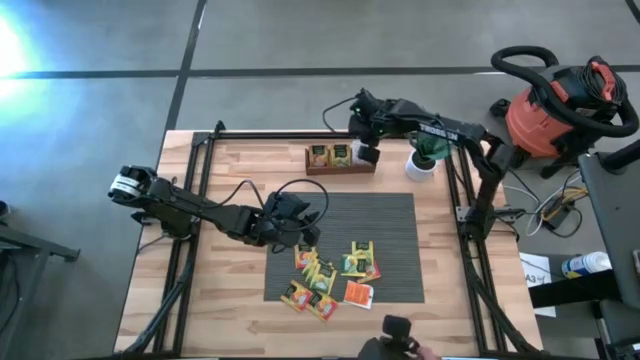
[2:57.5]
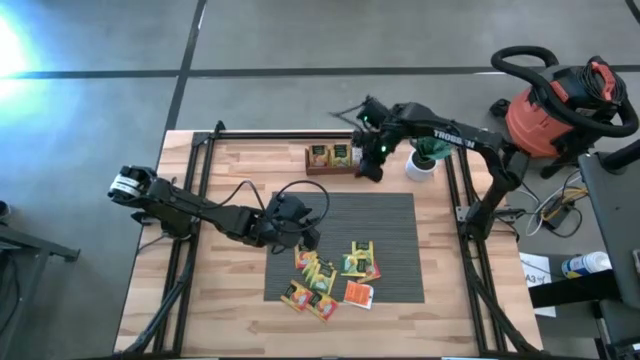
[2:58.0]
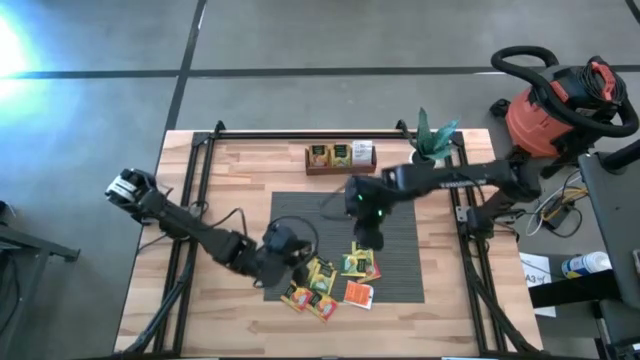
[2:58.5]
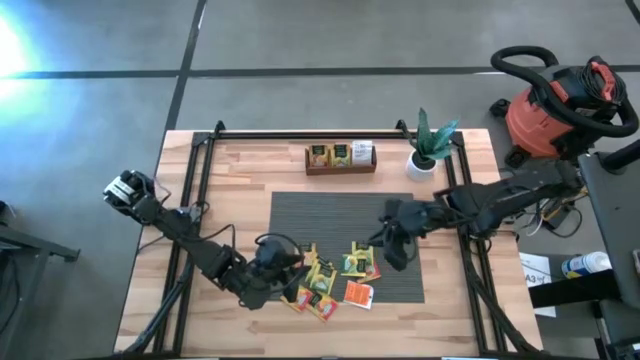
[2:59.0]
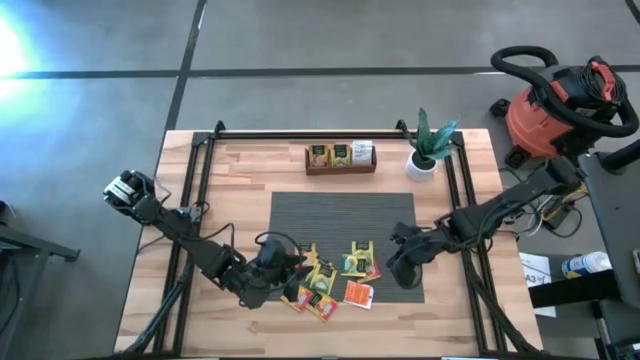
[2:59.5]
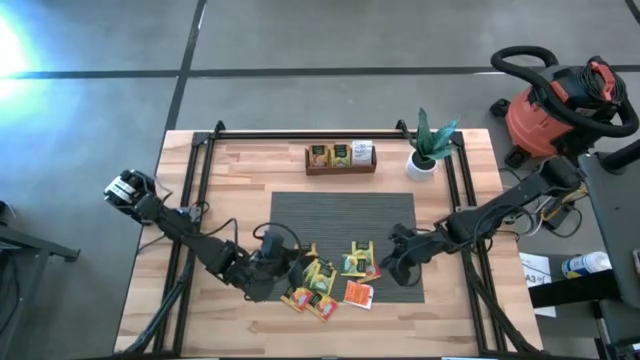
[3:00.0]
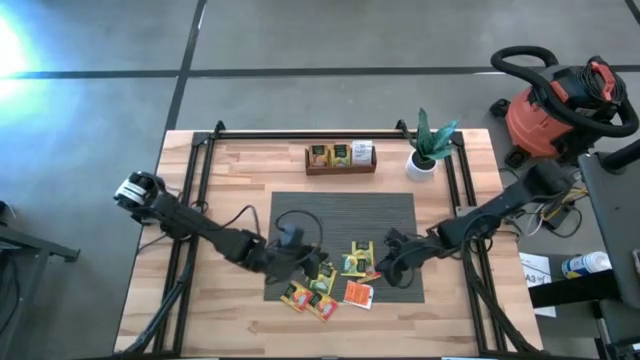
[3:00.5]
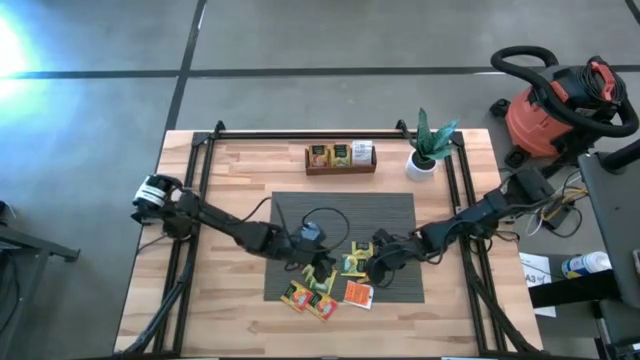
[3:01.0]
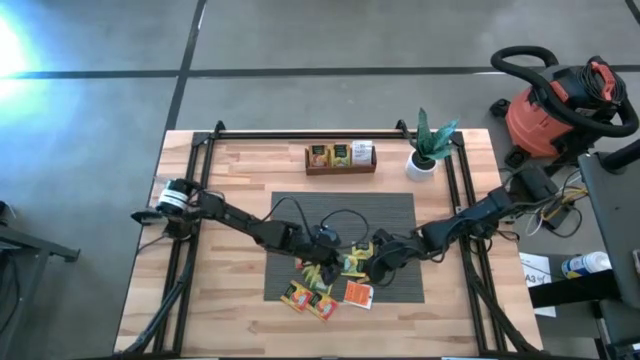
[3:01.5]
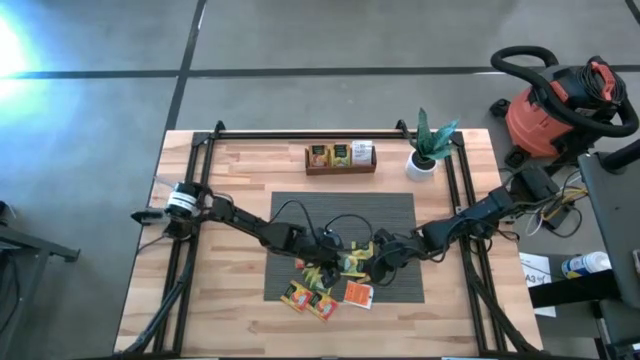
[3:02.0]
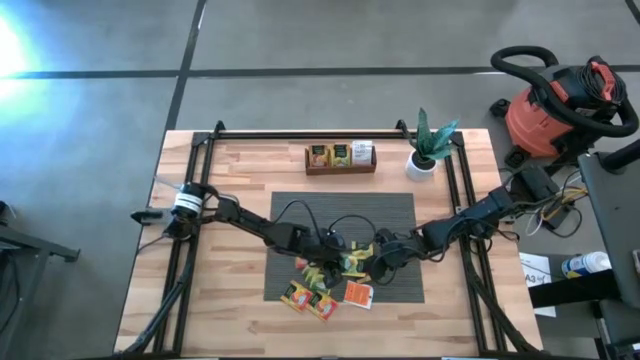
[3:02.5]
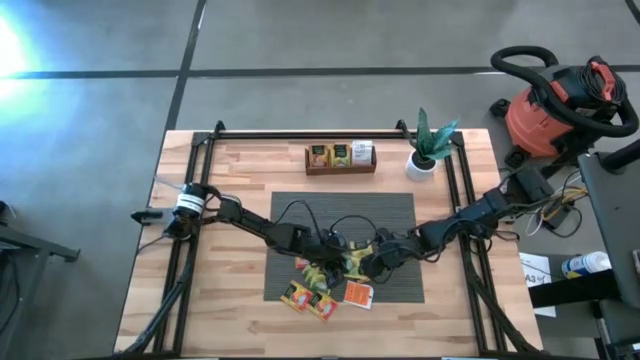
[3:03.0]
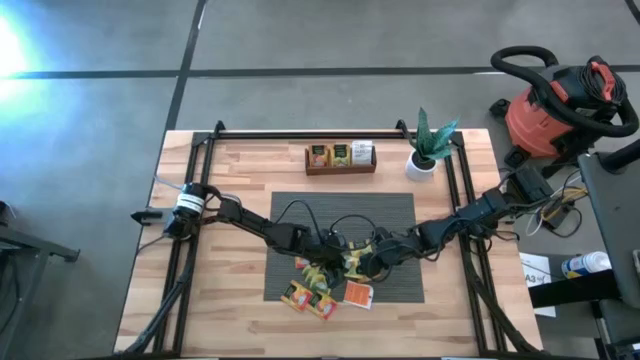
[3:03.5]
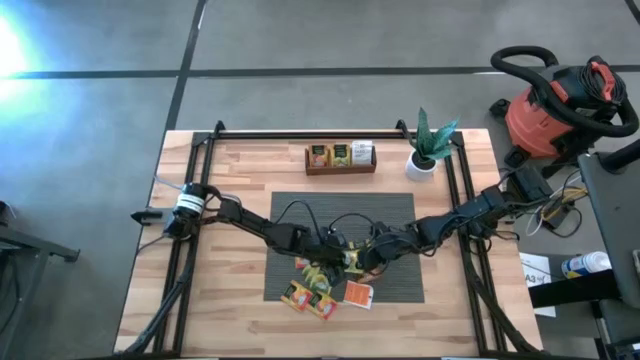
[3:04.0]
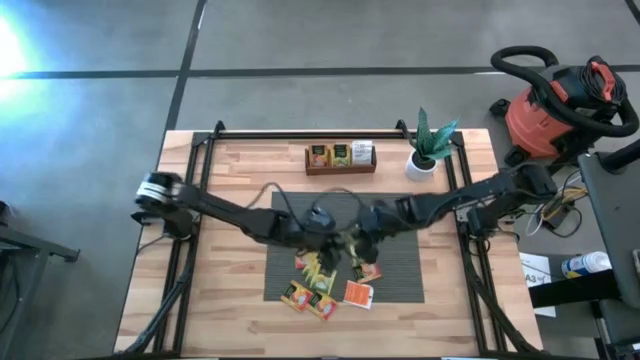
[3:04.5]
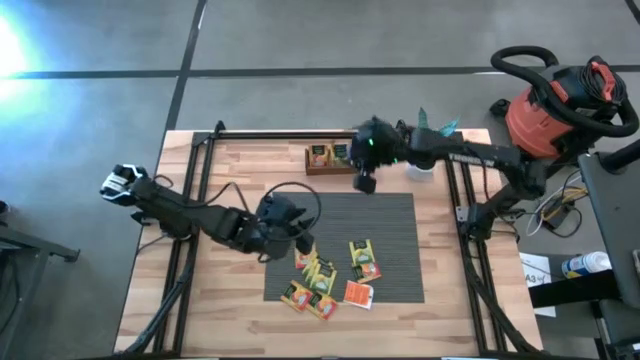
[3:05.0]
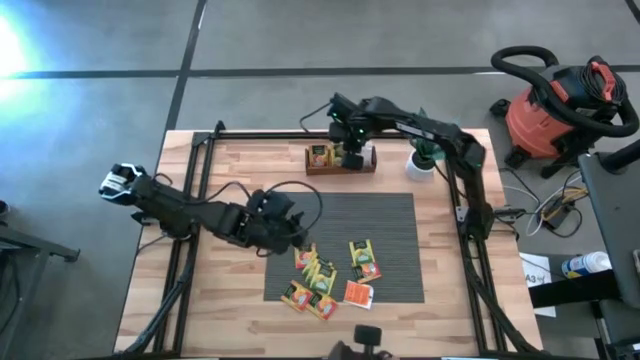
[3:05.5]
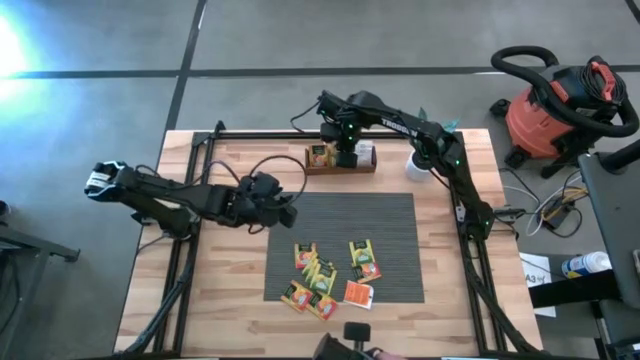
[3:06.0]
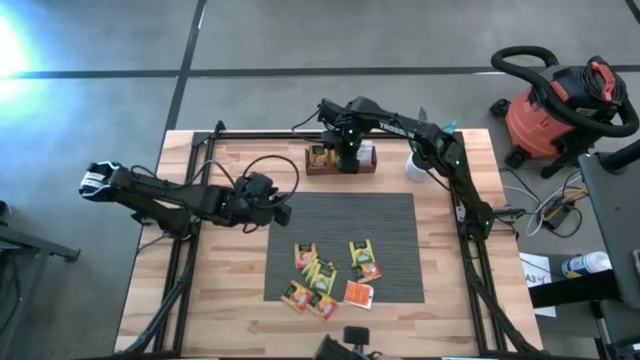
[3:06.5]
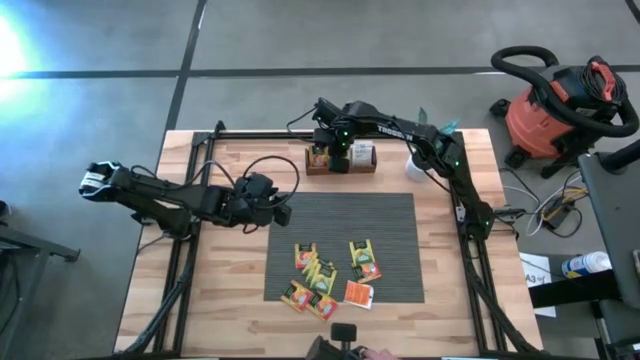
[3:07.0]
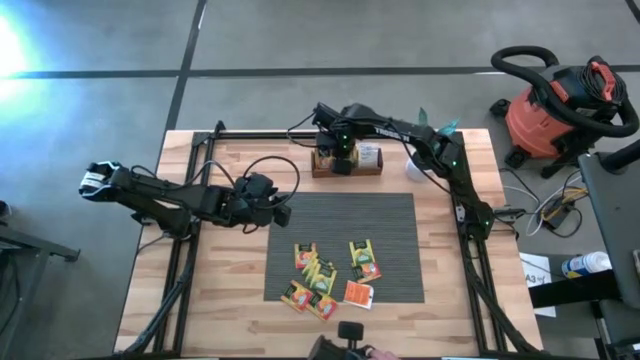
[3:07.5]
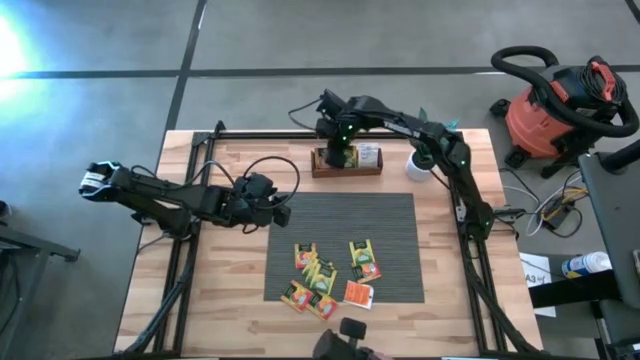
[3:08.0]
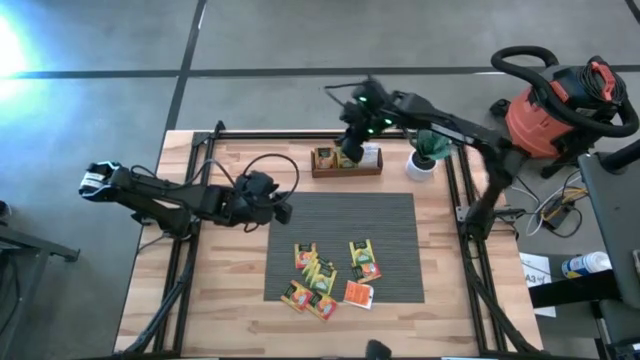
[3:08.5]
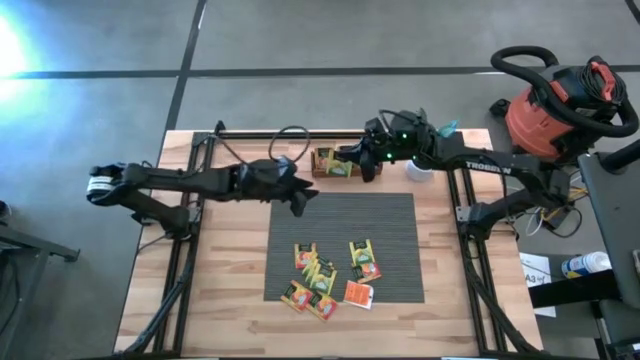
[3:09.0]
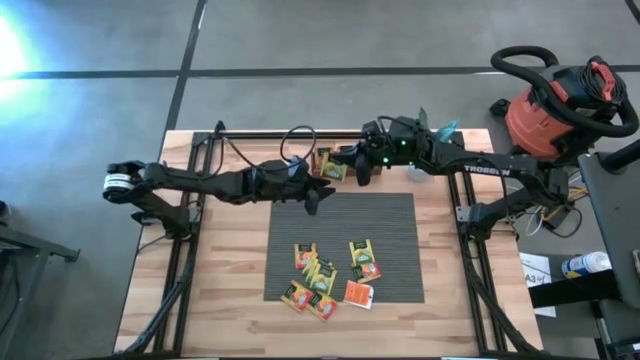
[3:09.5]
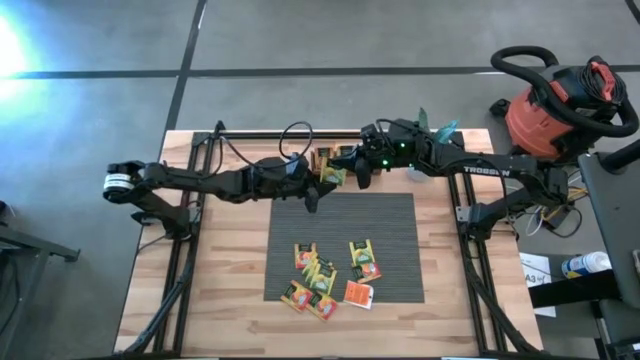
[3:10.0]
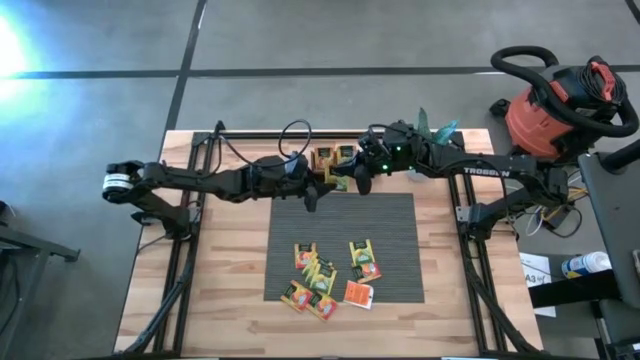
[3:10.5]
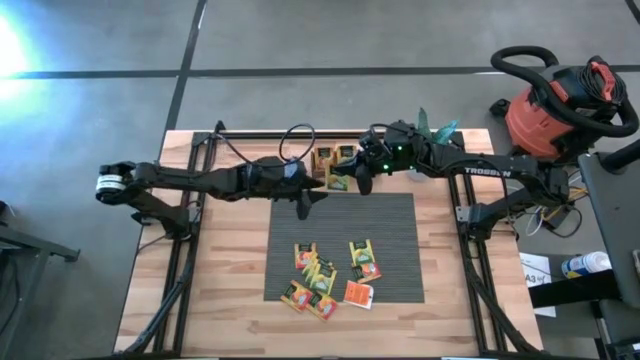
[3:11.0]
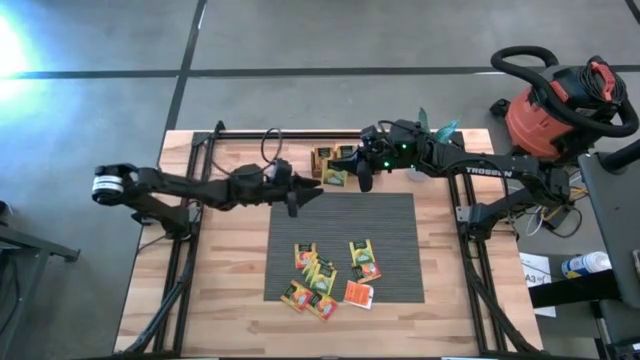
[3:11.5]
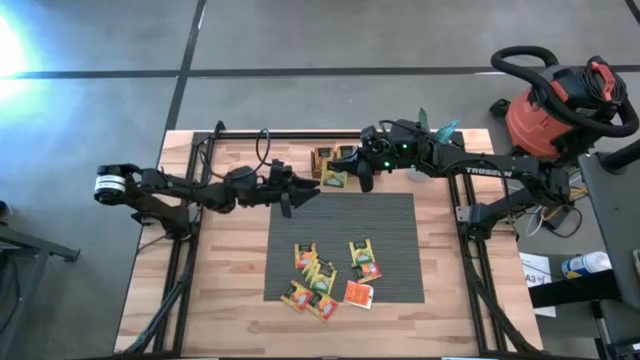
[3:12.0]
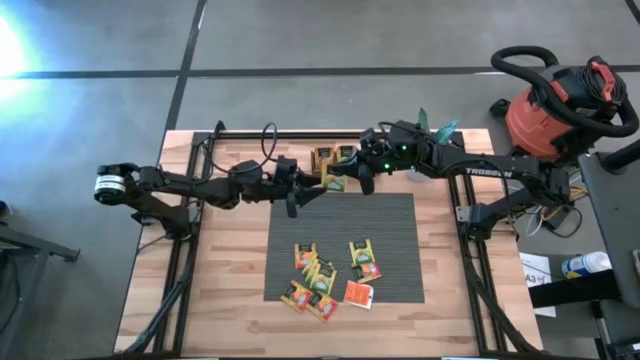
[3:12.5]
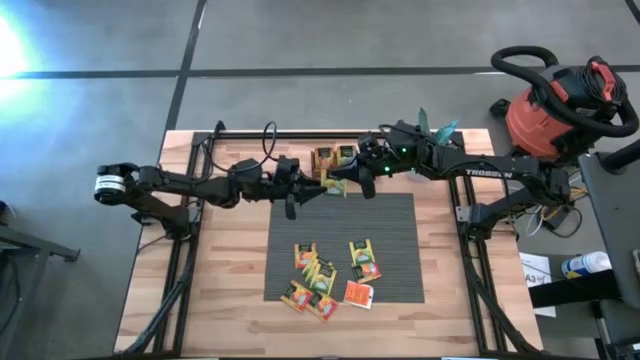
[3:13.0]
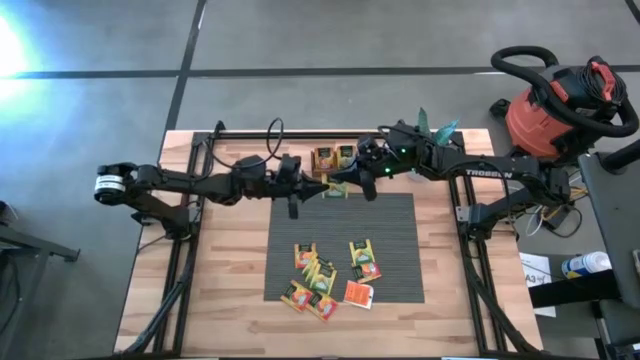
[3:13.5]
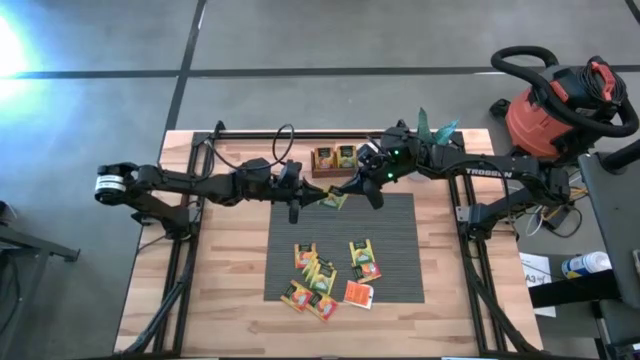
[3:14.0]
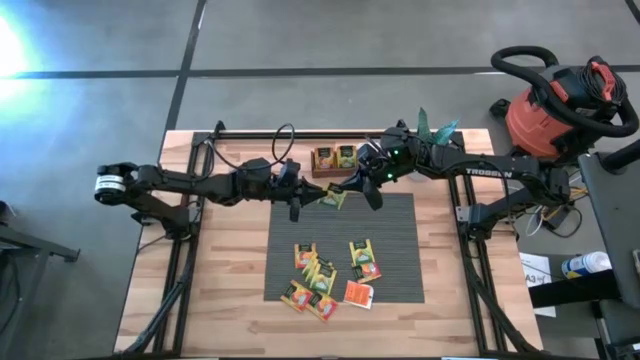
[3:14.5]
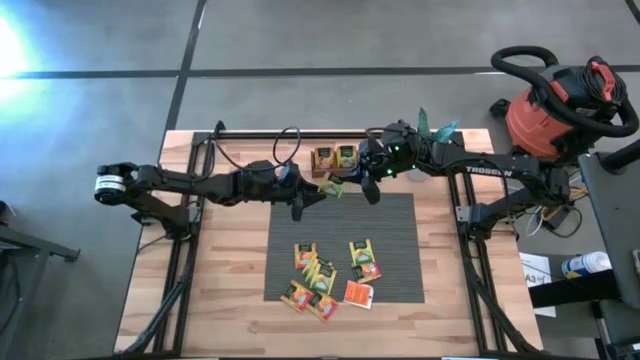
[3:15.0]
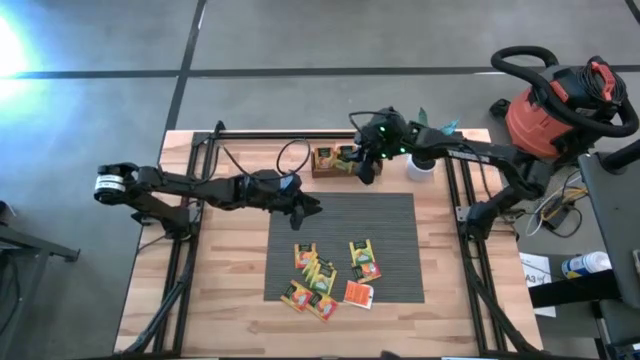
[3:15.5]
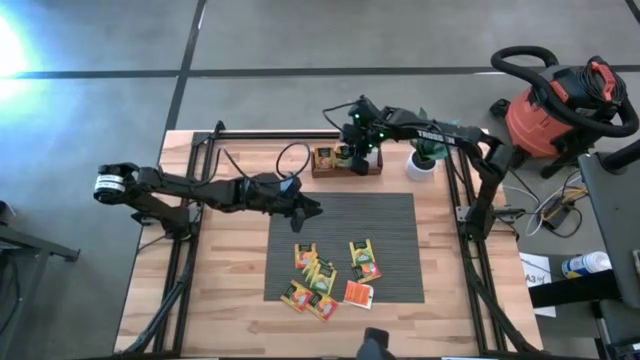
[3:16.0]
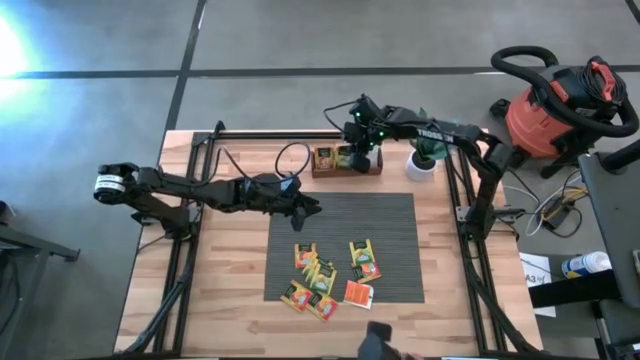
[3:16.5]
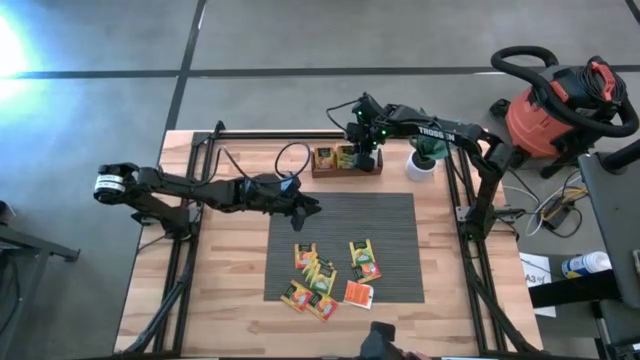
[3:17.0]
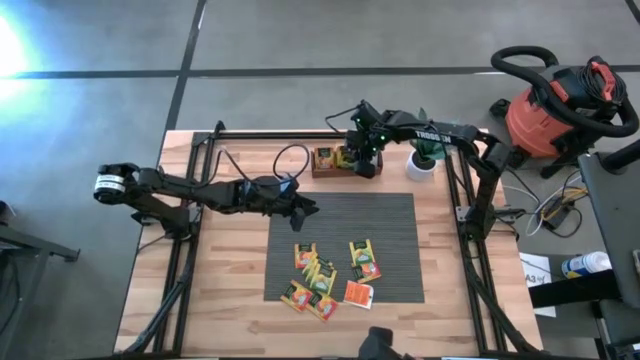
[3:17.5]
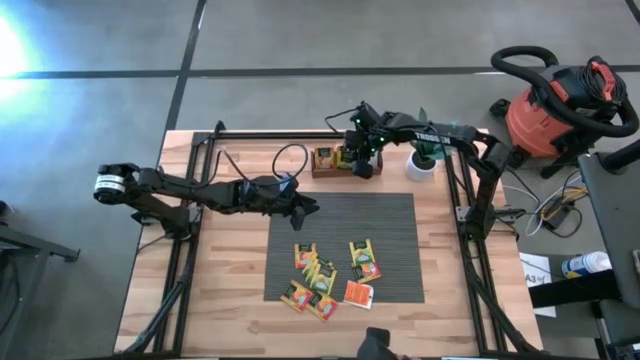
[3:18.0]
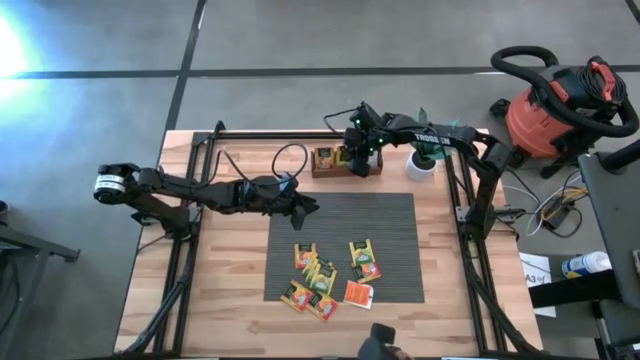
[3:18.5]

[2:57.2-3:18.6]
Task: Pick & Place Tea
Put the yellow tea bag into the middle section of the wooden organizer
